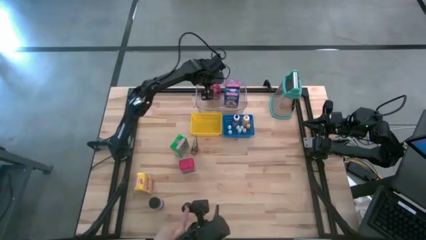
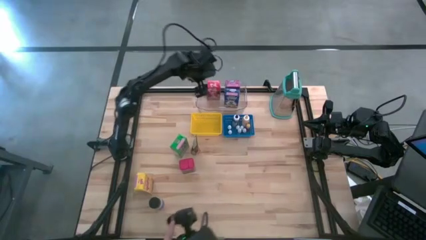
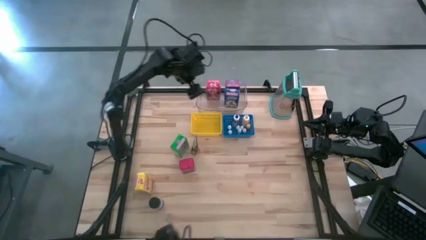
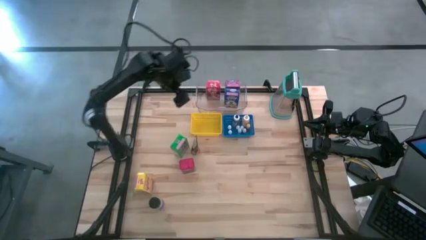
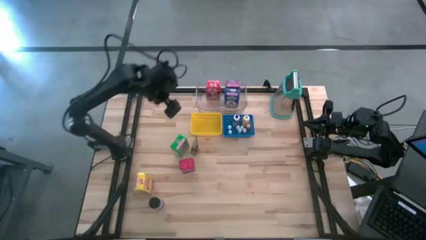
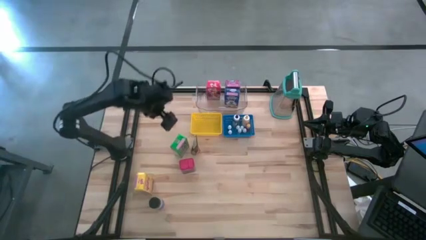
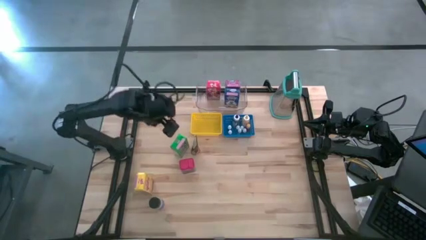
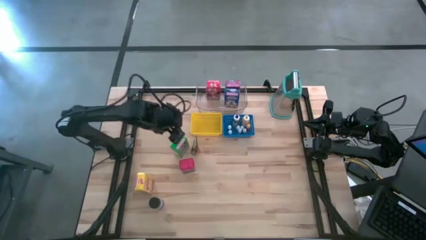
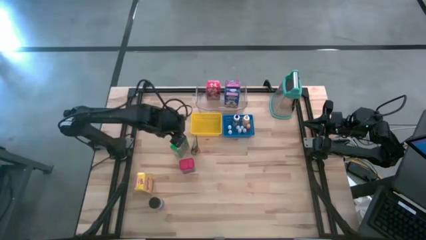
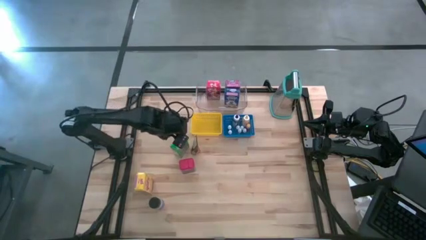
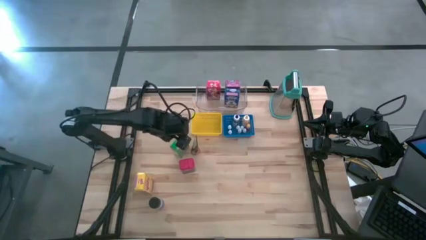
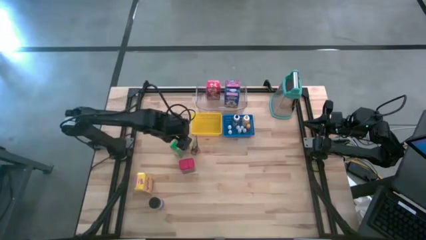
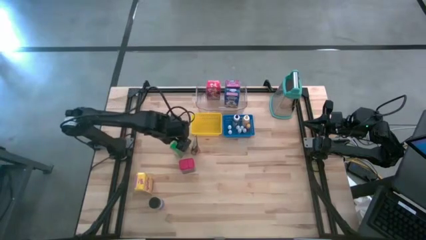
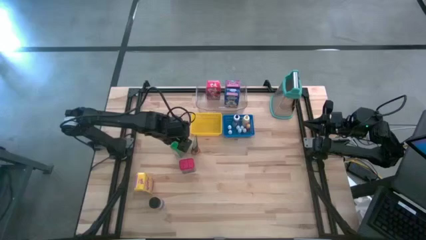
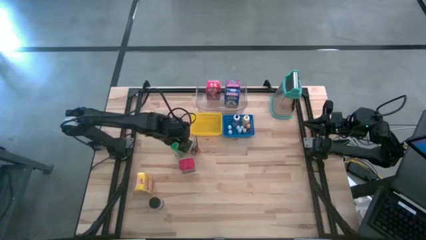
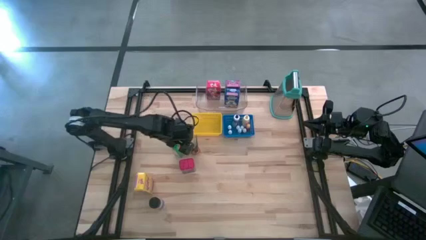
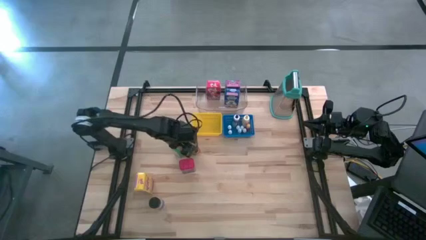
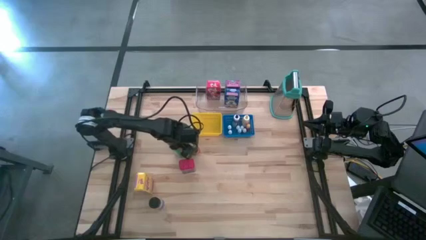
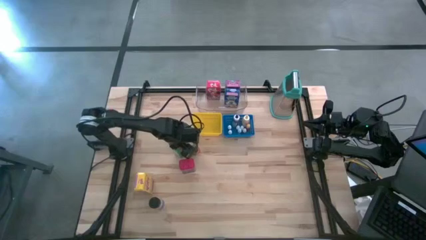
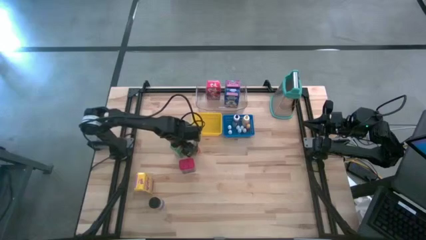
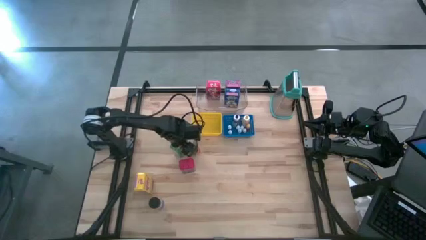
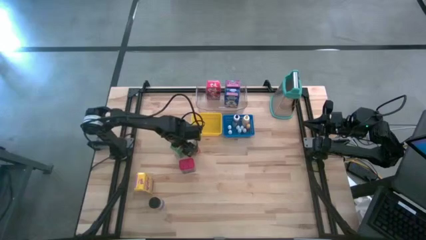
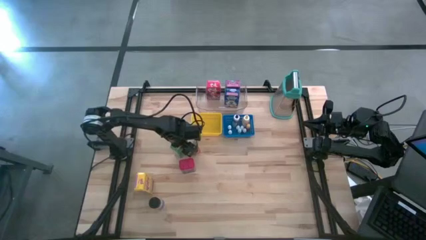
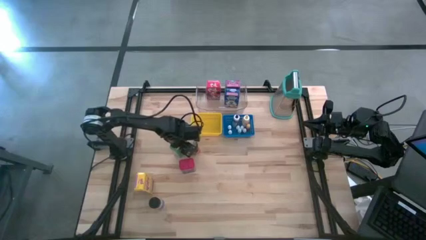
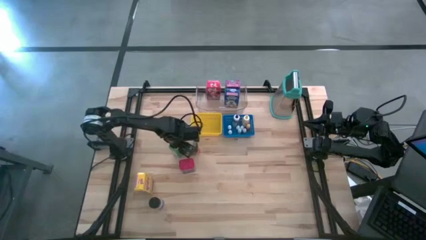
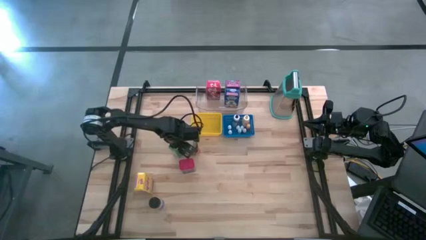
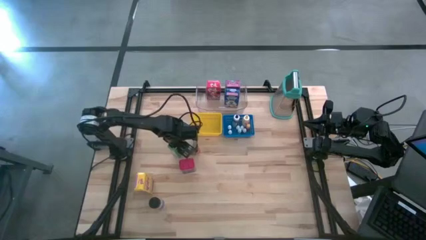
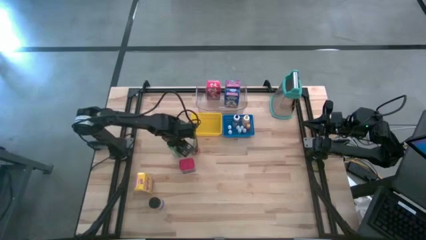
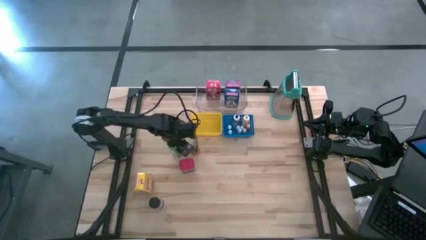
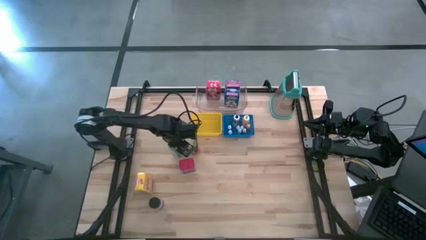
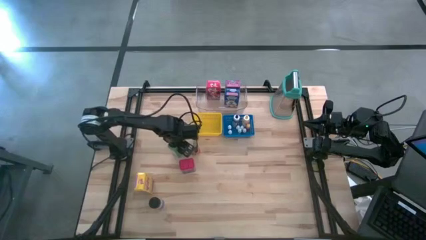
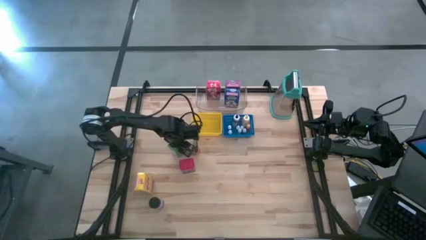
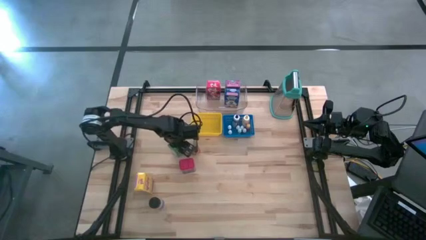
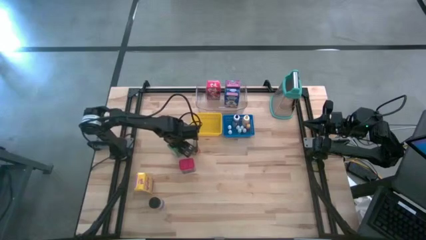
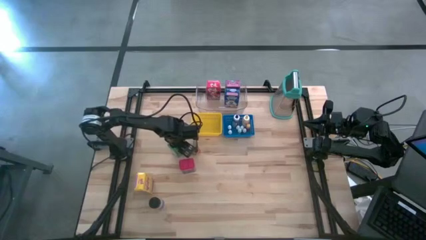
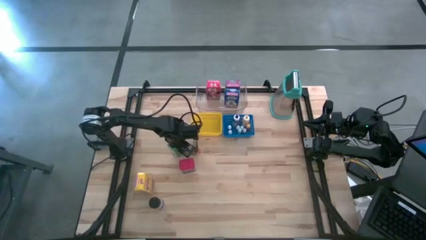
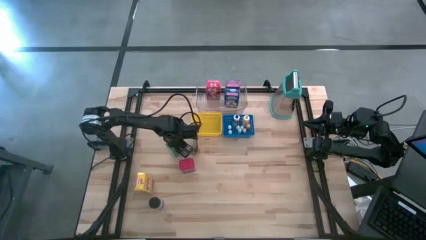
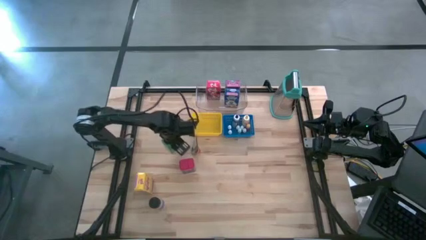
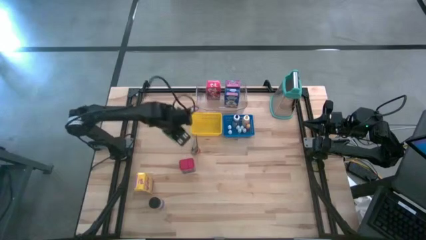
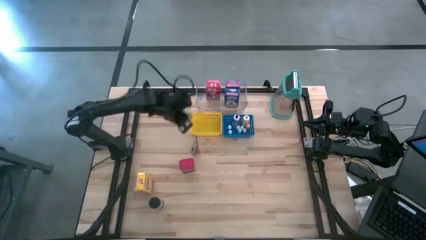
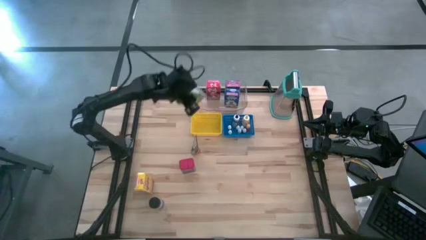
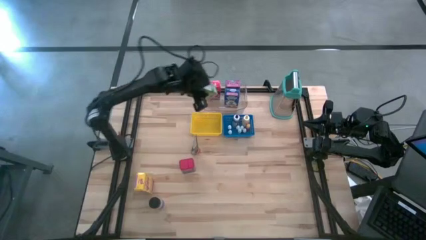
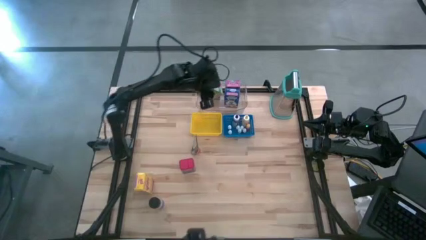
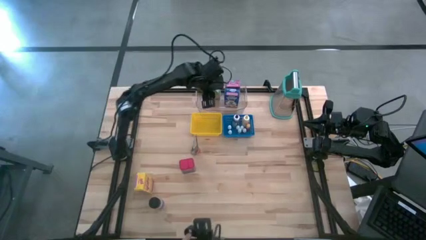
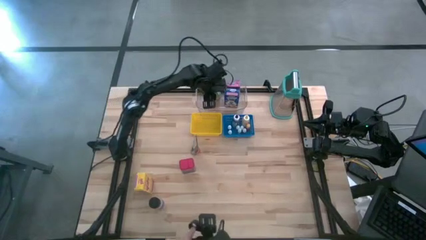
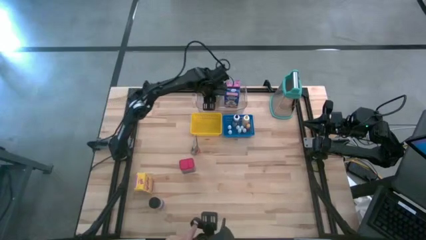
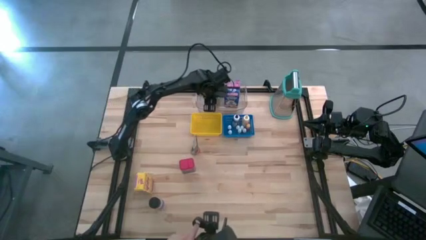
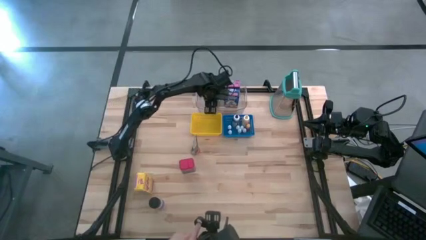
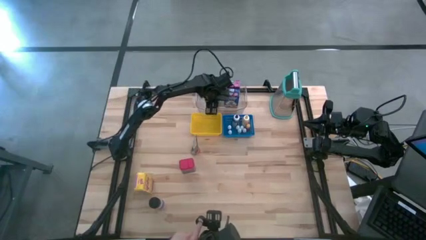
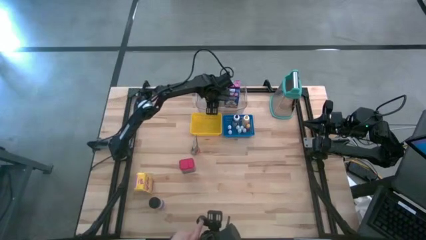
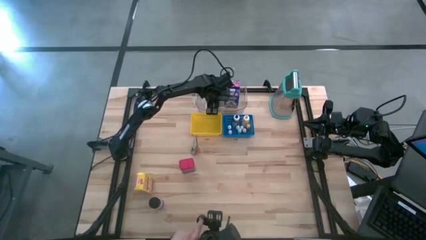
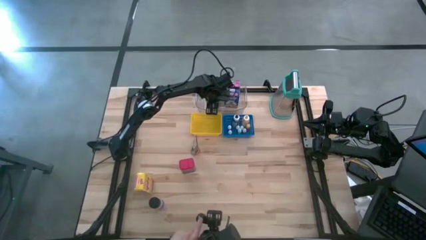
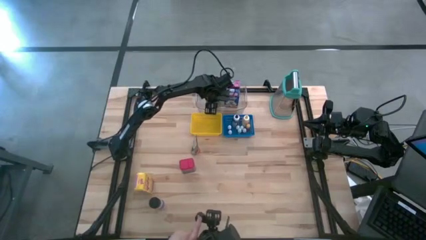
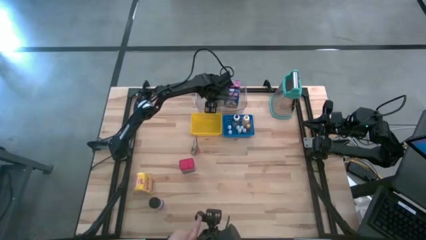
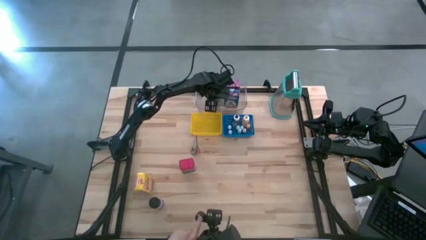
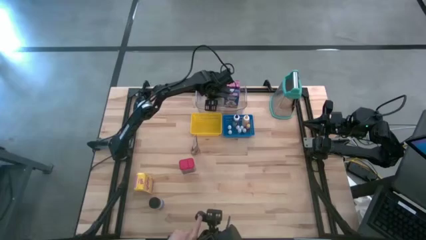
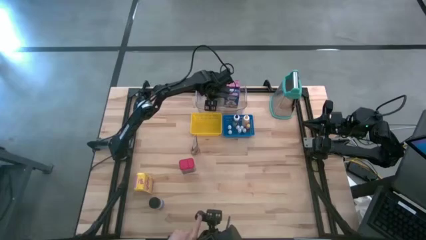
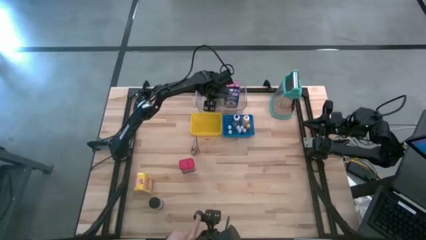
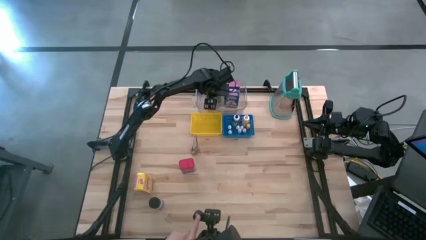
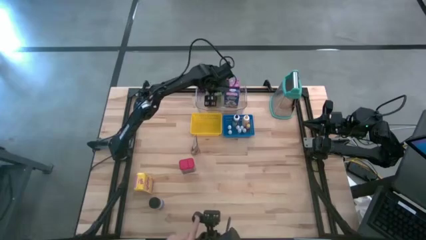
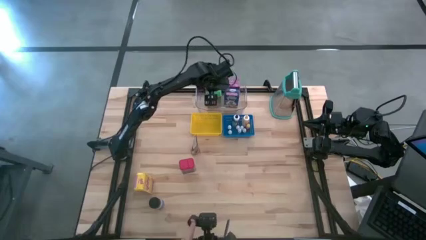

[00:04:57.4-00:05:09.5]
Task: Pick & Place Kitchen Items
Put the green cereal box into the transparent bin
